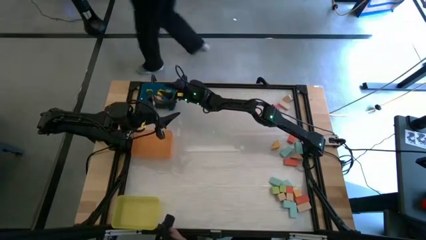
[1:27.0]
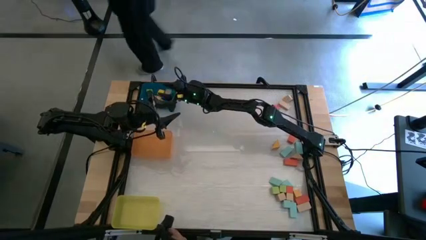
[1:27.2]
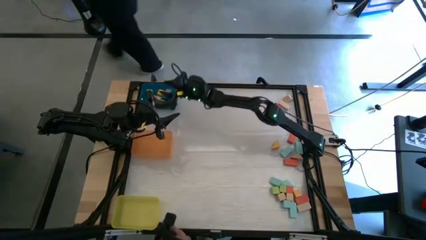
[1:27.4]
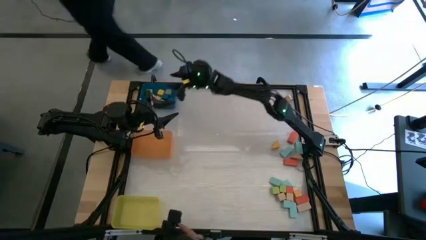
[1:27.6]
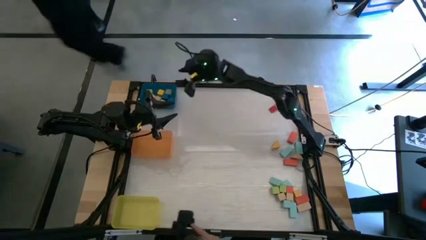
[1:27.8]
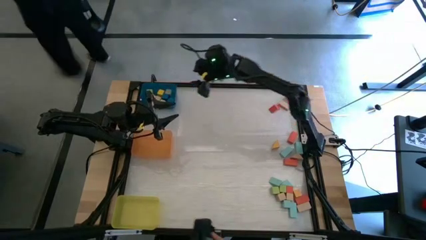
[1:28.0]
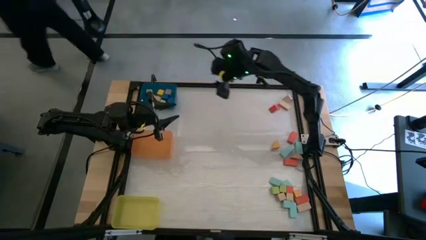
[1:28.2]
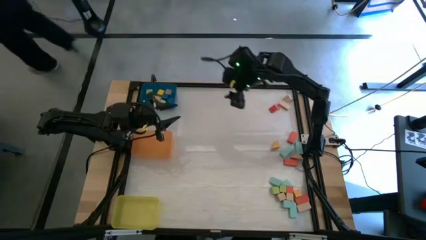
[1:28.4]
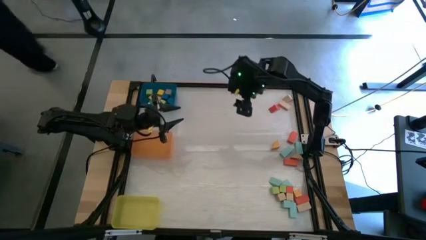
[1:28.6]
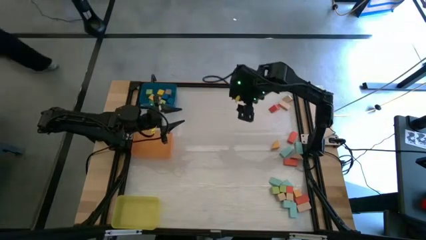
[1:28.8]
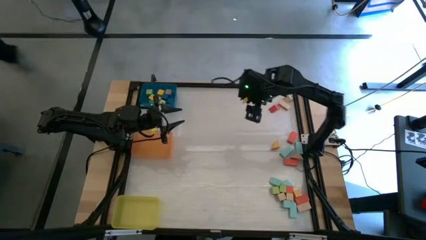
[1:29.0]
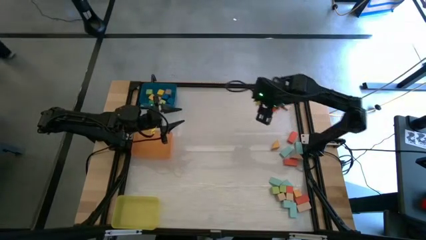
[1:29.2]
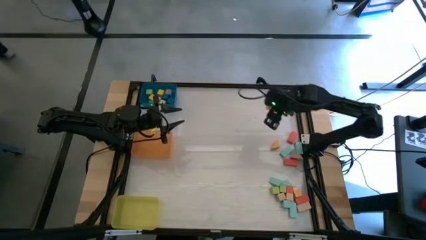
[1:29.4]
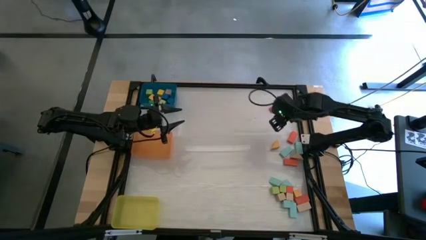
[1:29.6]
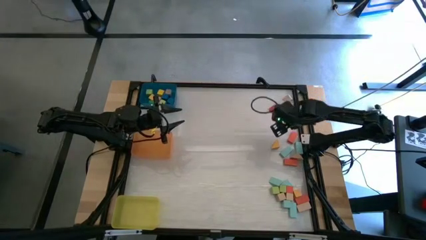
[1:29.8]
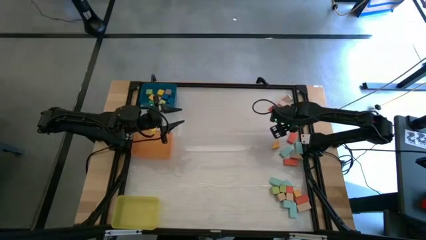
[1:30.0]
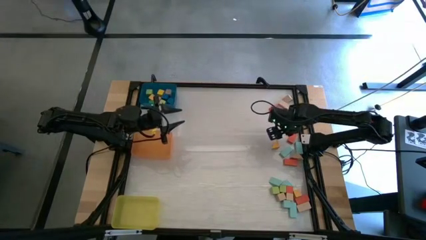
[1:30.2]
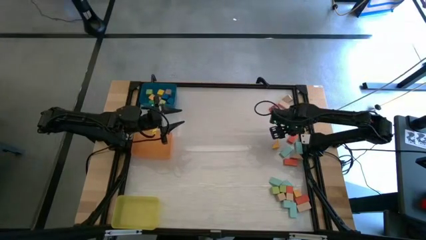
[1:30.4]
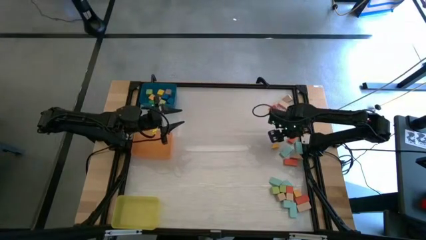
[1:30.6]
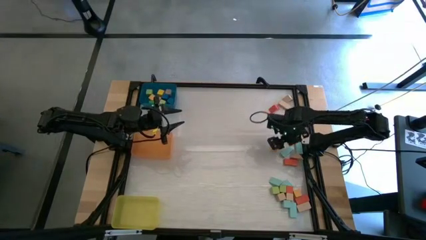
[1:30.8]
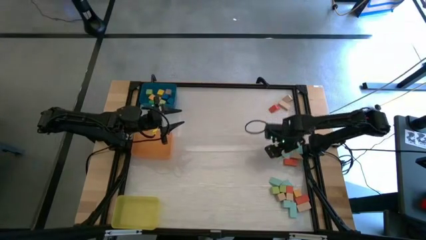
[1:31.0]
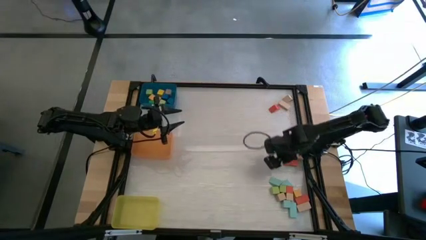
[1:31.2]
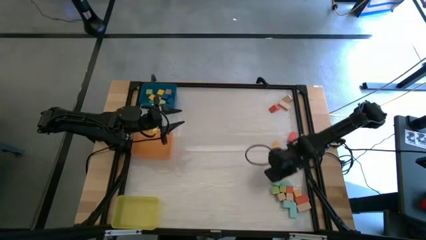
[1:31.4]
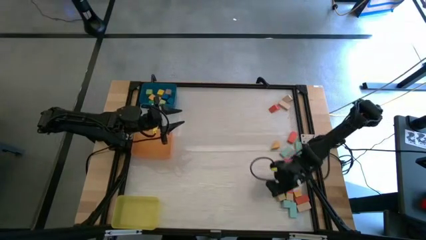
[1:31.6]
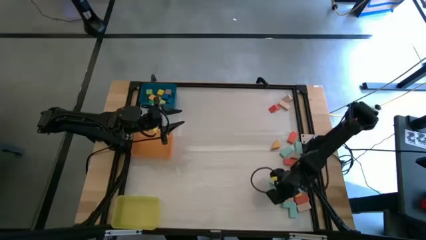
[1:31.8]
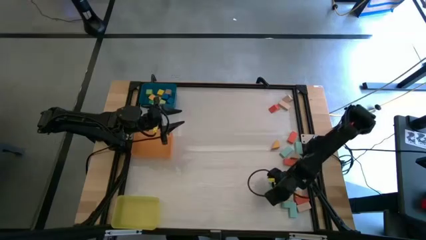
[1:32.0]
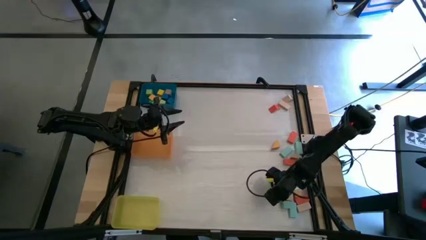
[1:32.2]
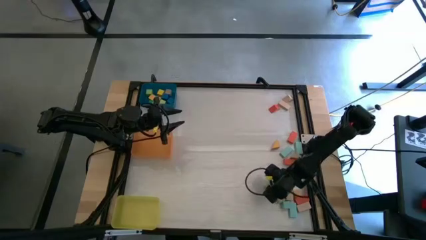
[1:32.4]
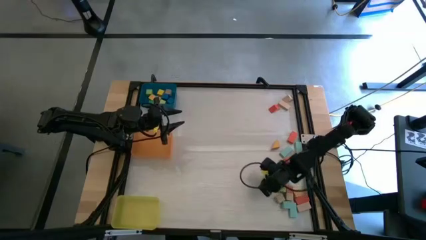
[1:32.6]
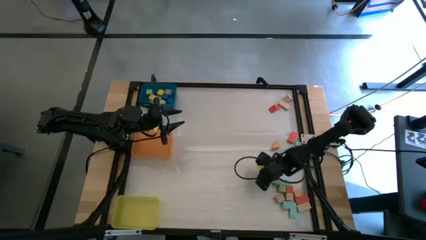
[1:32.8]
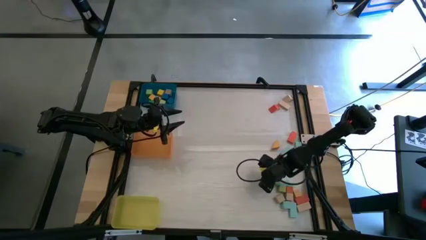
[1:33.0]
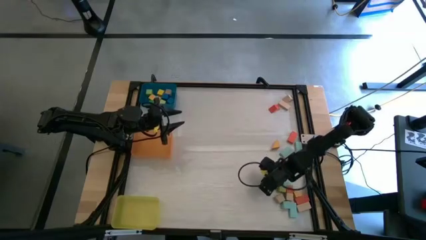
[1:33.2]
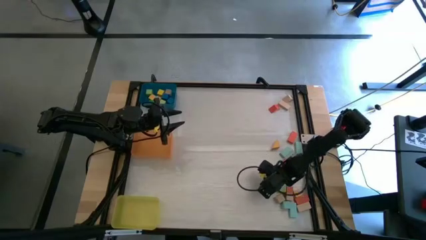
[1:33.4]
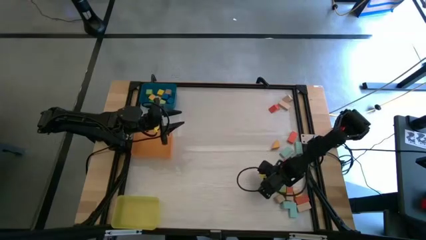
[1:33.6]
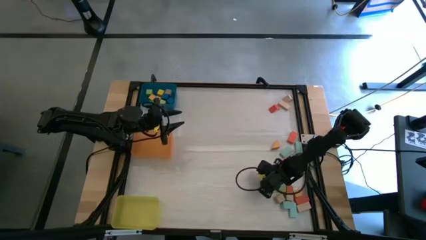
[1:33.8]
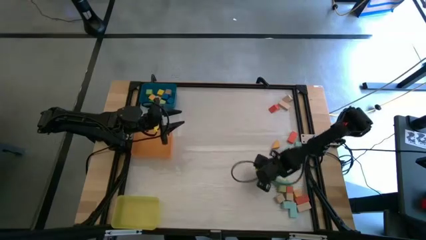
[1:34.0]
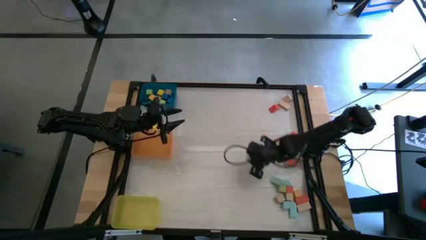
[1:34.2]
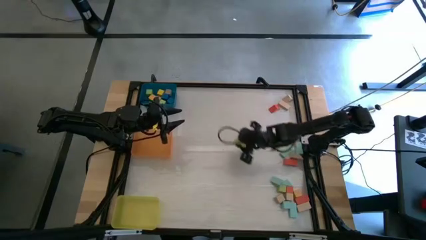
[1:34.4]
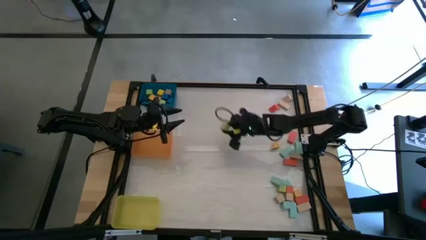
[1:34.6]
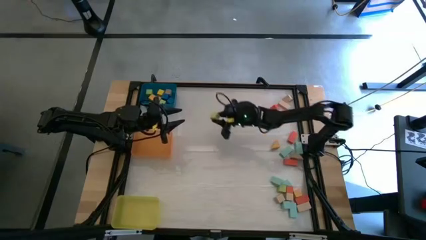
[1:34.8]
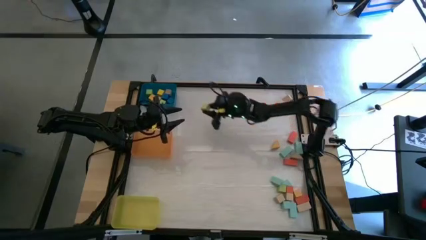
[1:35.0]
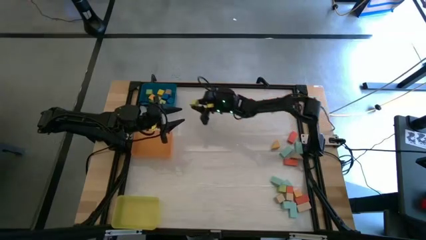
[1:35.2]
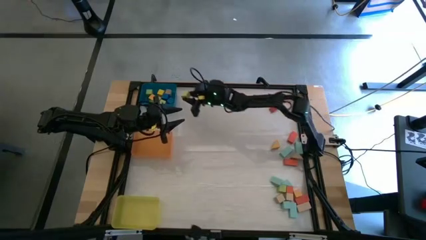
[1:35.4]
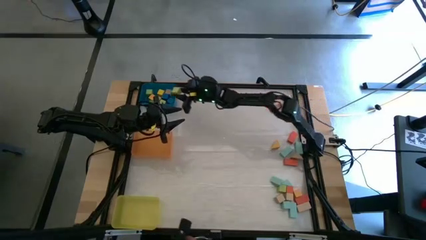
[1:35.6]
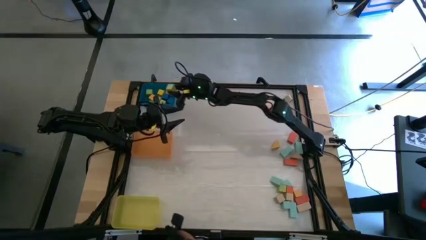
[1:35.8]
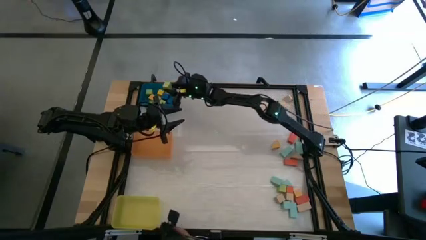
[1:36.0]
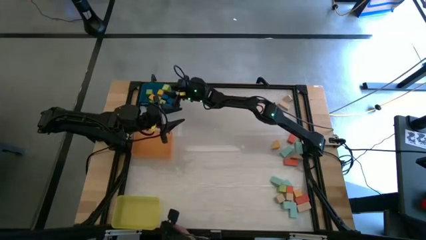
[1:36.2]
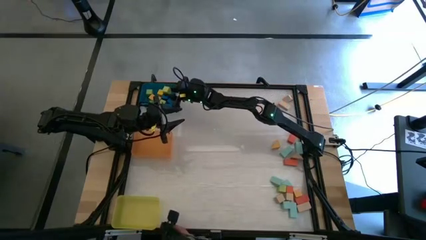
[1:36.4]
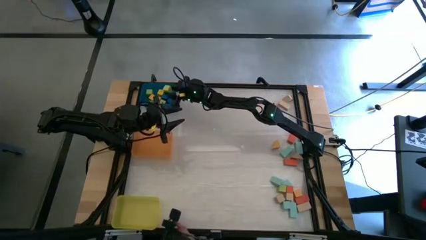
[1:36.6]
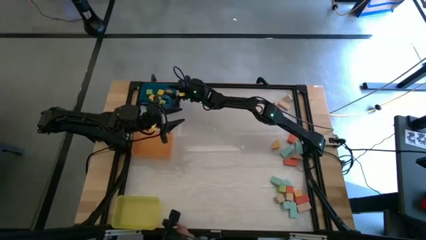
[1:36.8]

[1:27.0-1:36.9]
Task: Sort blocks by size
Put the light green cube block into the blue bin

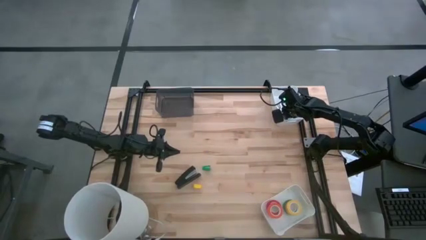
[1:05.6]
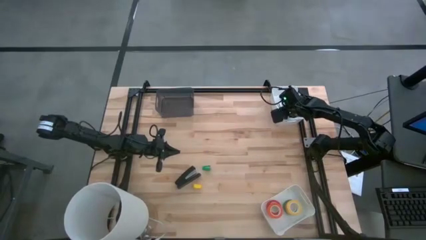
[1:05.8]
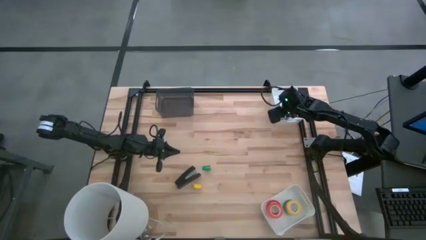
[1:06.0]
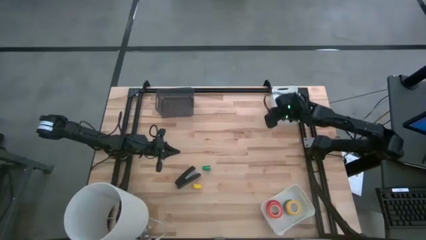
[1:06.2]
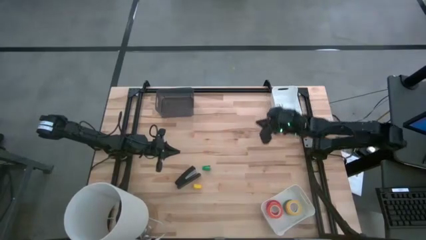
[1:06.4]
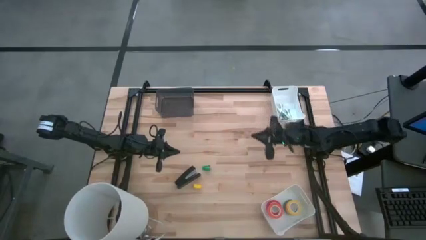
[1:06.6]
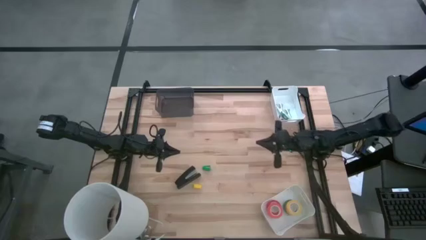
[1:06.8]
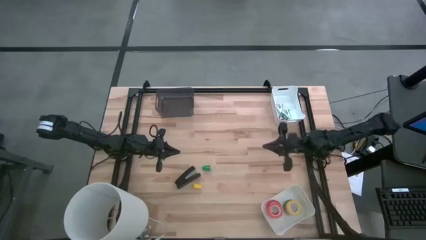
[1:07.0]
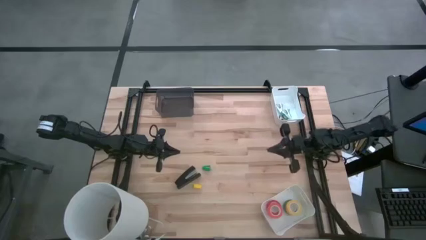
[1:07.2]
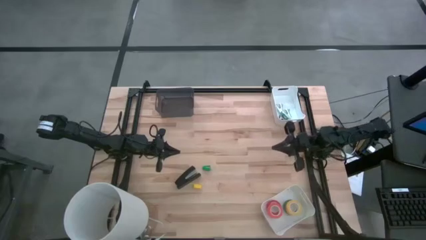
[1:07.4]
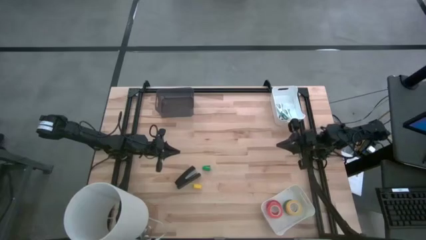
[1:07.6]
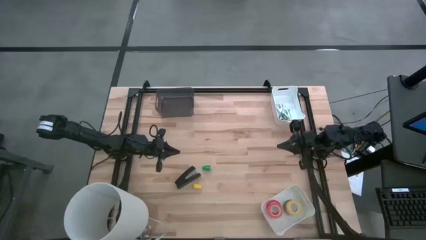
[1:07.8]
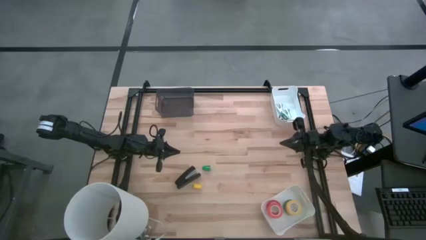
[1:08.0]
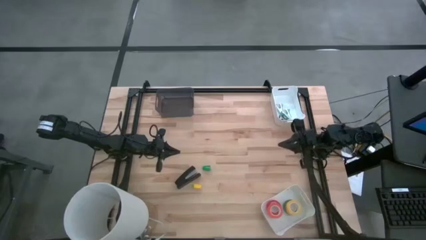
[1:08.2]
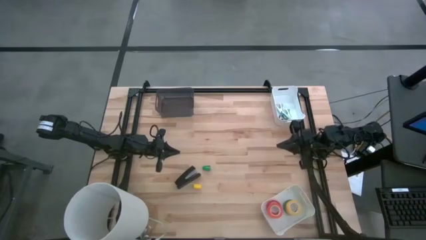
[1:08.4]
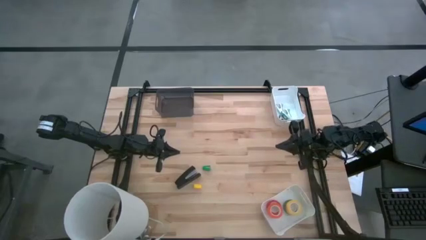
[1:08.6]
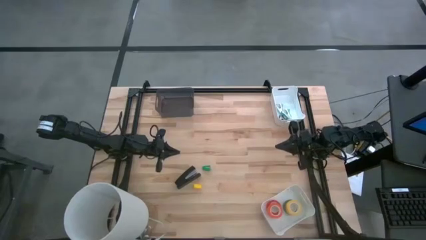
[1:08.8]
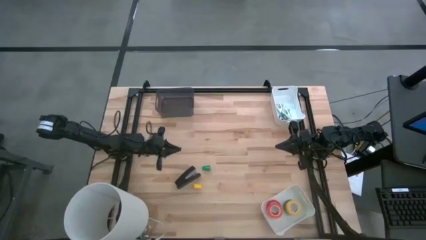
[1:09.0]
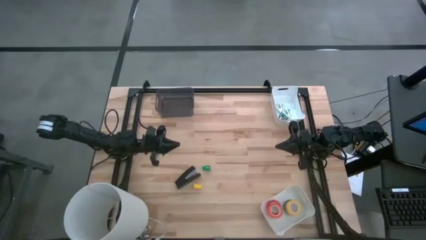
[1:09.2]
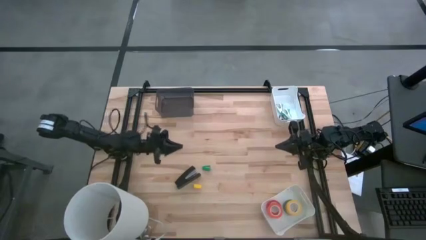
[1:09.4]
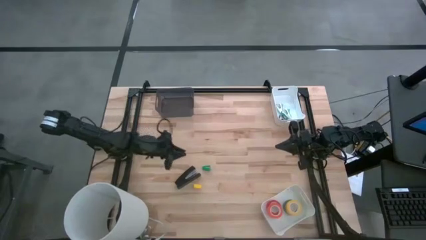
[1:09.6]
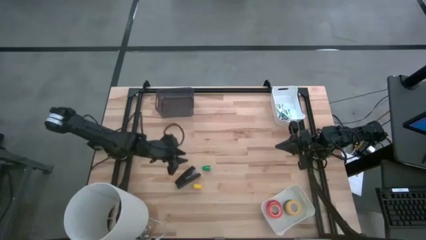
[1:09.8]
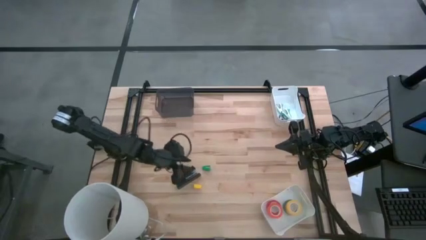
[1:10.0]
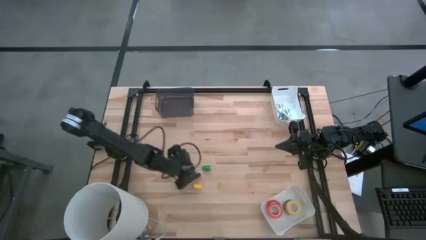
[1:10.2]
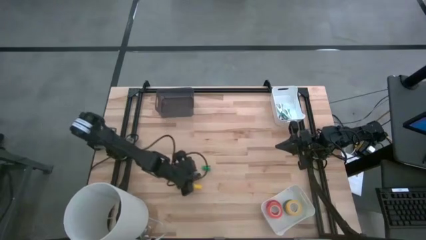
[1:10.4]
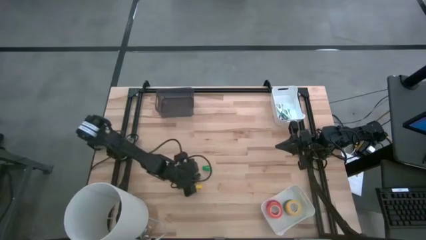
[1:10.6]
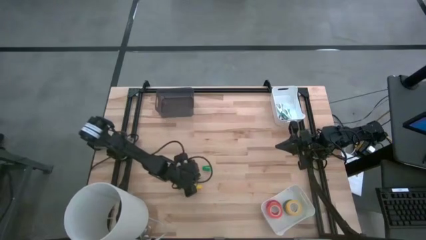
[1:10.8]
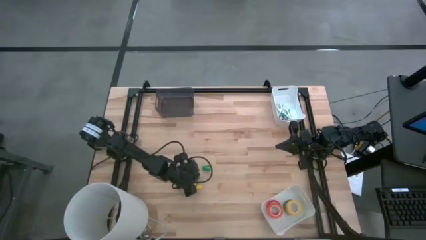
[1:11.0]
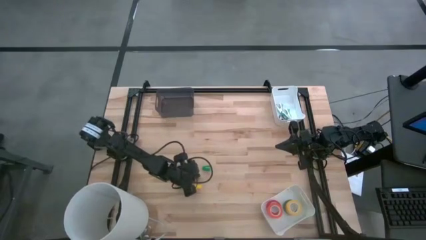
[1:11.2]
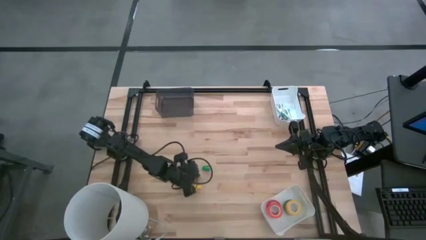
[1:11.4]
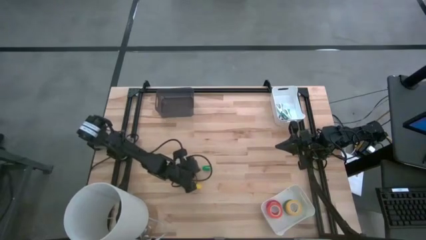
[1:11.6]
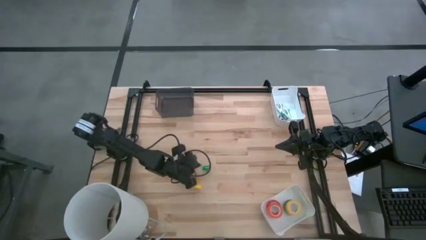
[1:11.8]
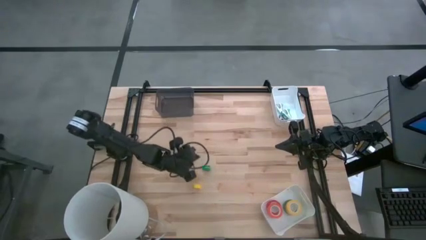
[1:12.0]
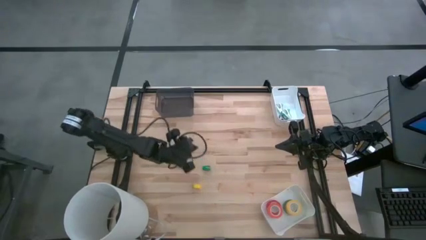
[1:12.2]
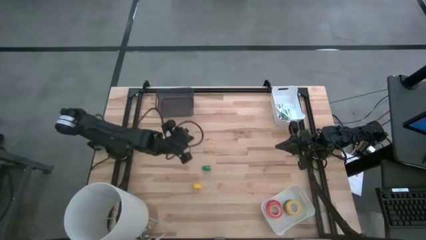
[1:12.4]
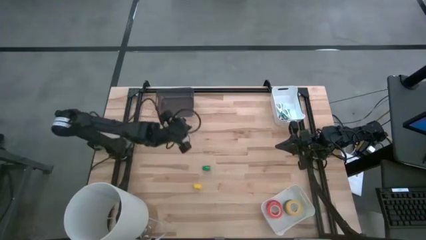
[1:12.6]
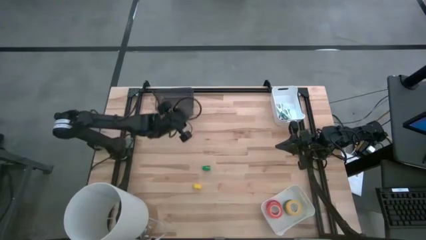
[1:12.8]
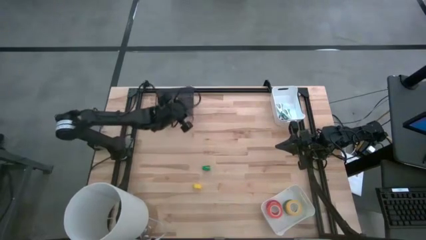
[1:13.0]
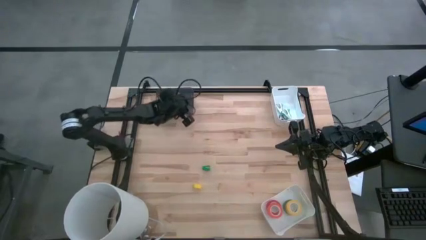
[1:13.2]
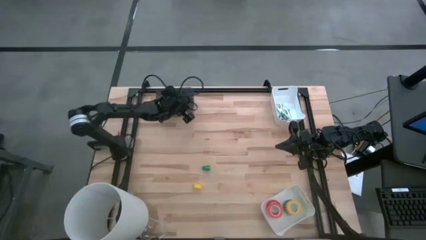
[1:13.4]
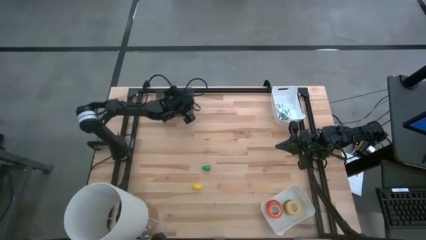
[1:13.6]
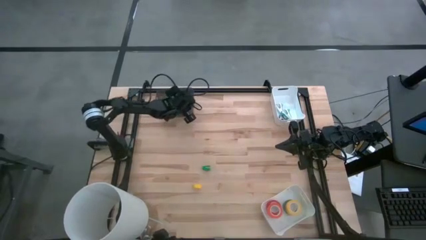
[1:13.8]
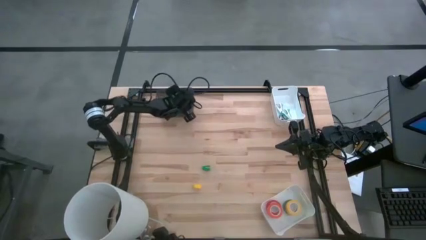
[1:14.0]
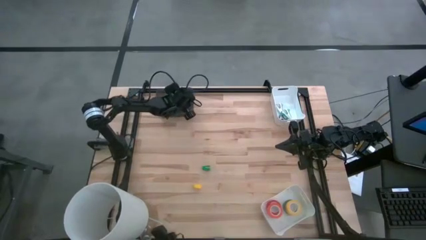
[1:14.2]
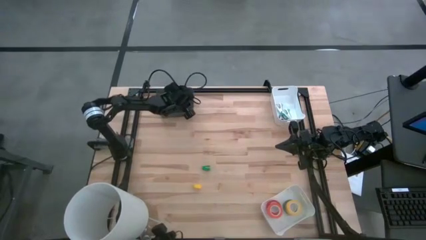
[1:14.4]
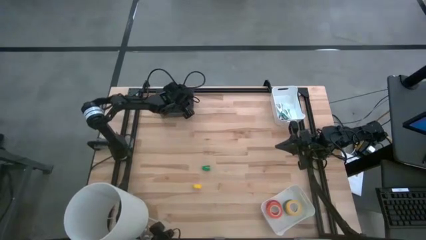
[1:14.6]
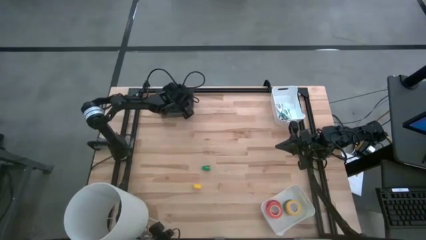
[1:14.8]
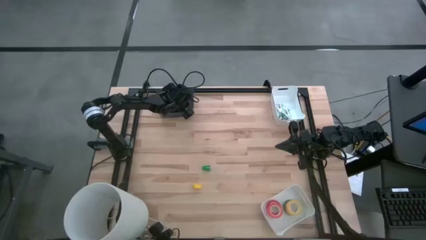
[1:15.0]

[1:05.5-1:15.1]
Task: Pick and place Stapler, Stapler remover, tape
Put the large black stapler into the black bin
